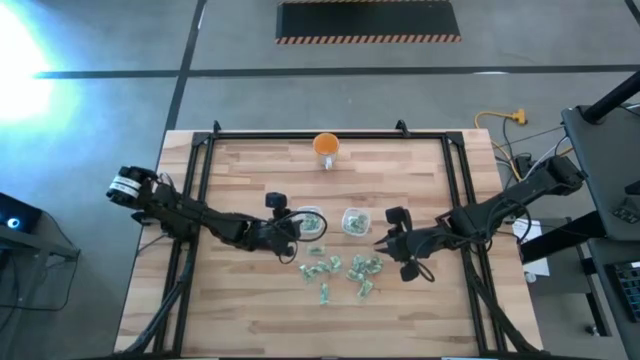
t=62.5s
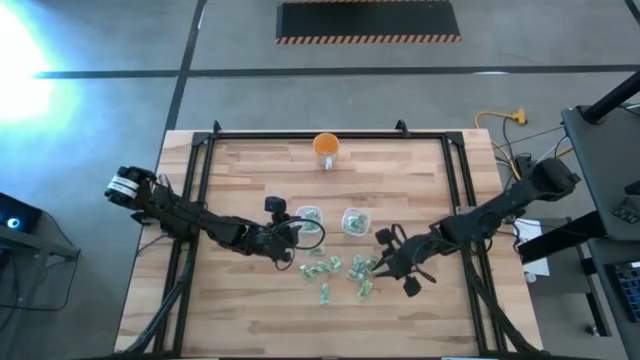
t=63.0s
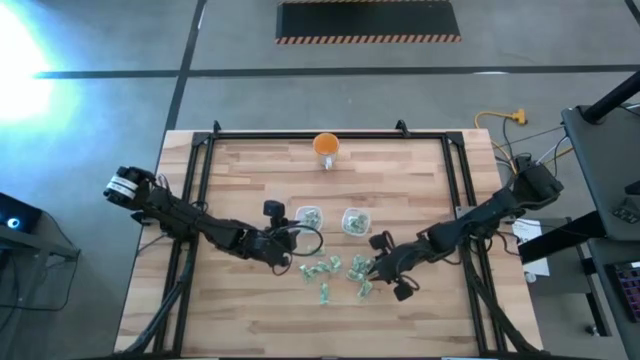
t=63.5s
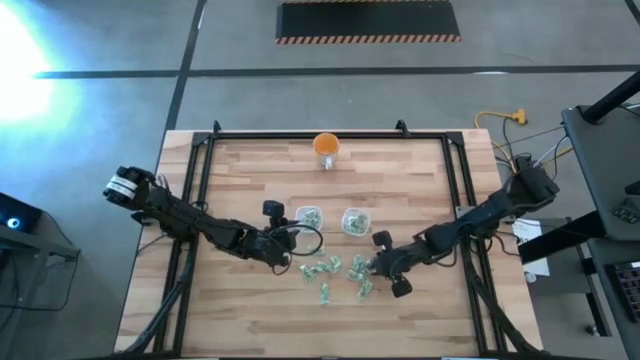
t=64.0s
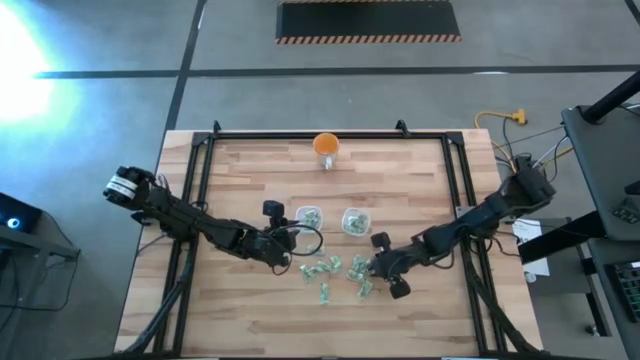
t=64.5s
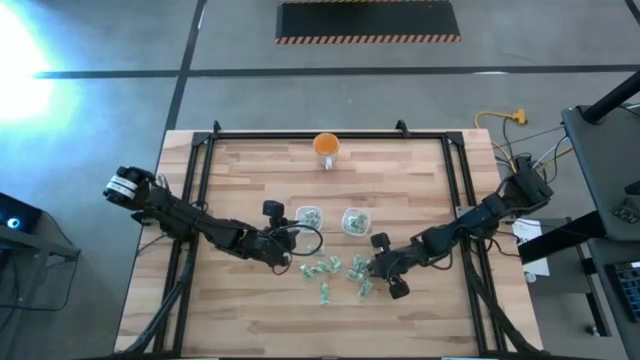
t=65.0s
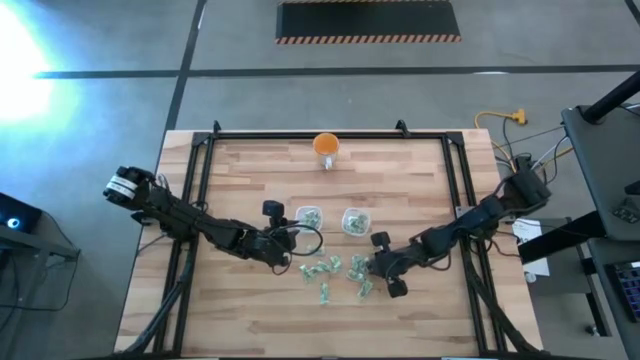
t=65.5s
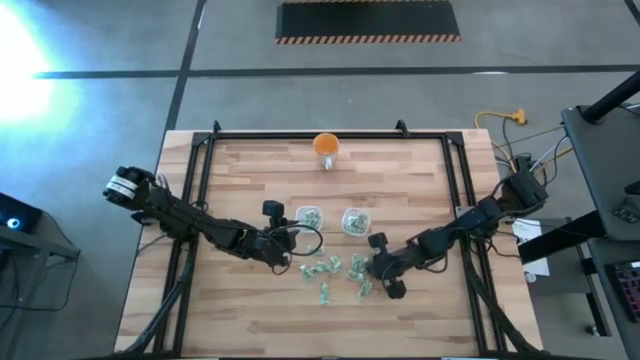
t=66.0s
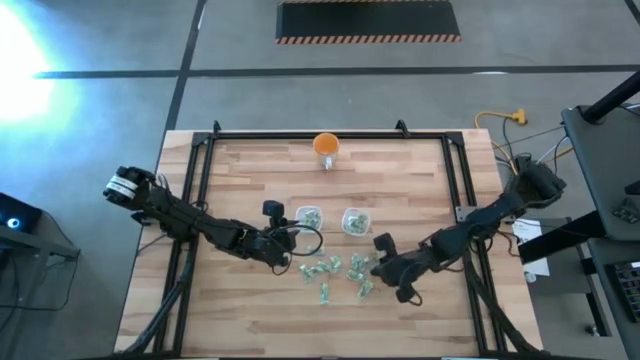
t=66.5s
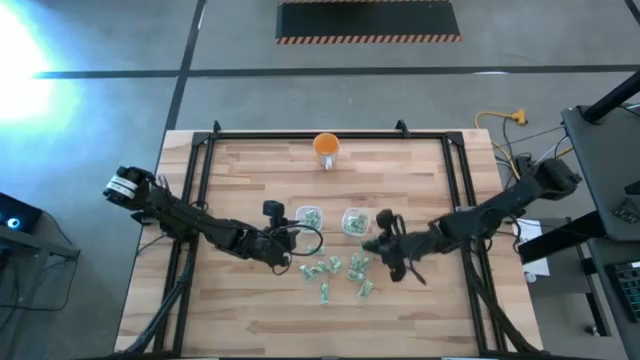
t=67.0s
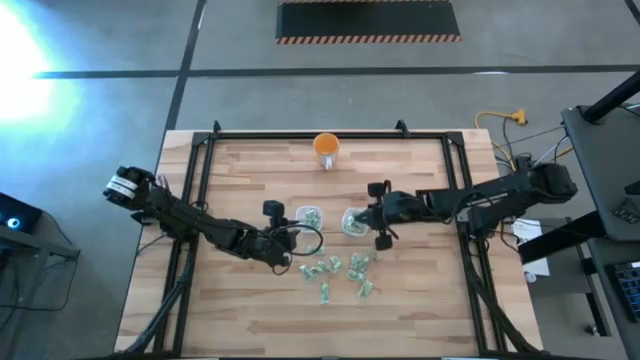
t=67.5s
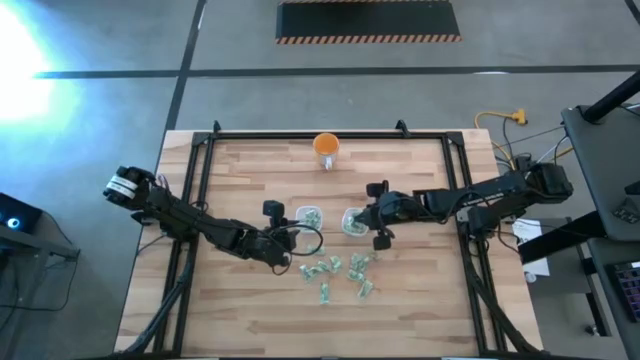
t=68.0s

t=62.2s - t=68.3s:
Task: Pick and place Stevia / Truvia into bins
Put the green stevia packet into the right transparent container

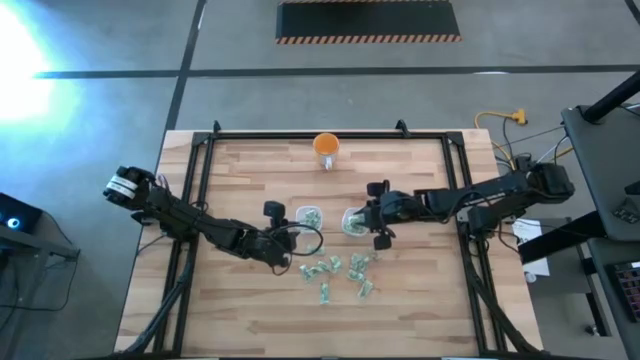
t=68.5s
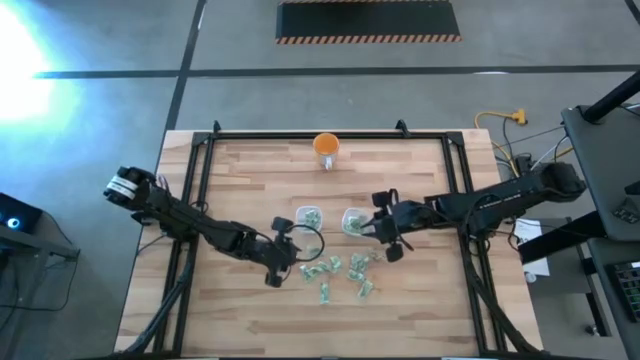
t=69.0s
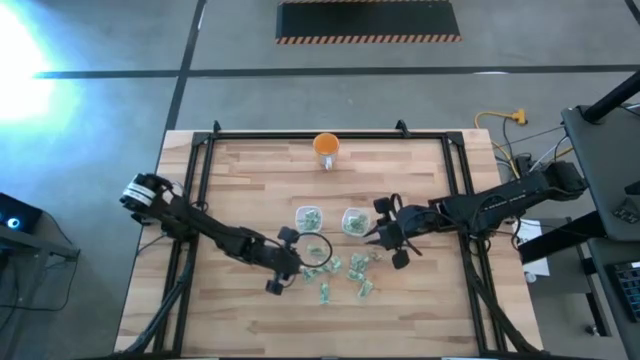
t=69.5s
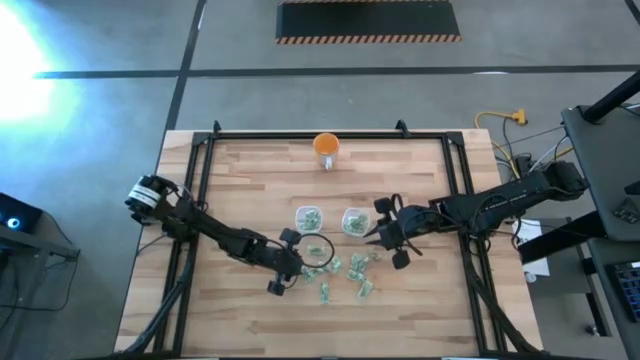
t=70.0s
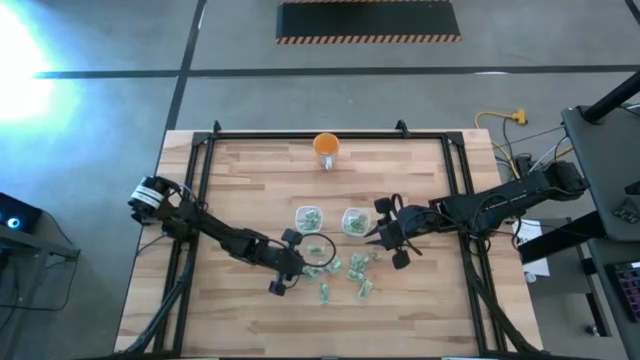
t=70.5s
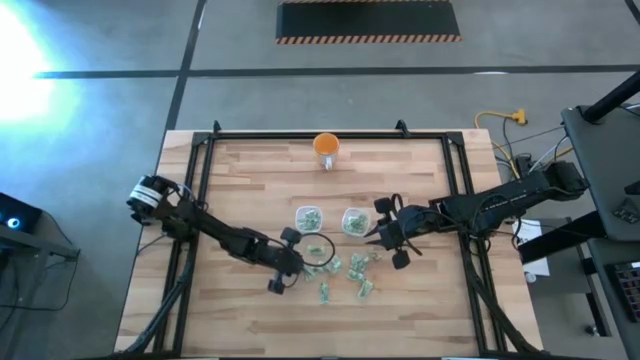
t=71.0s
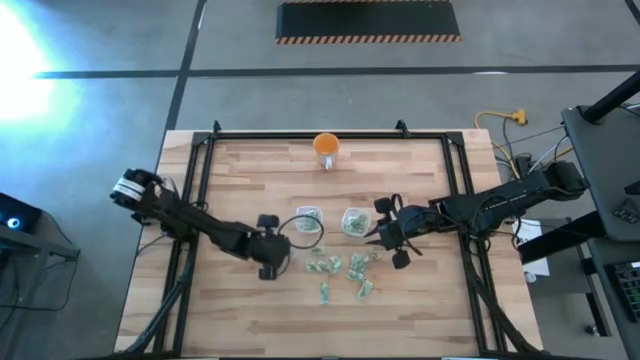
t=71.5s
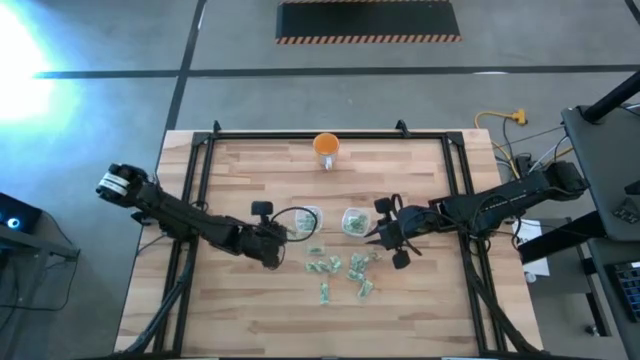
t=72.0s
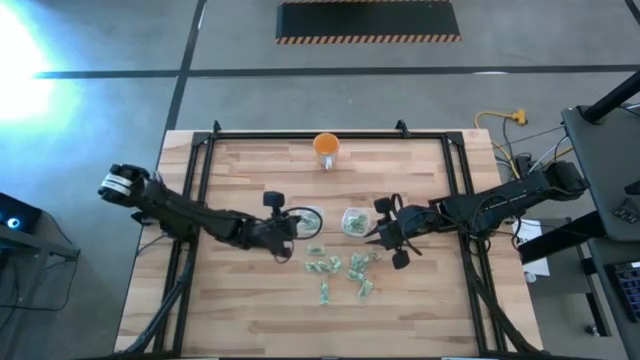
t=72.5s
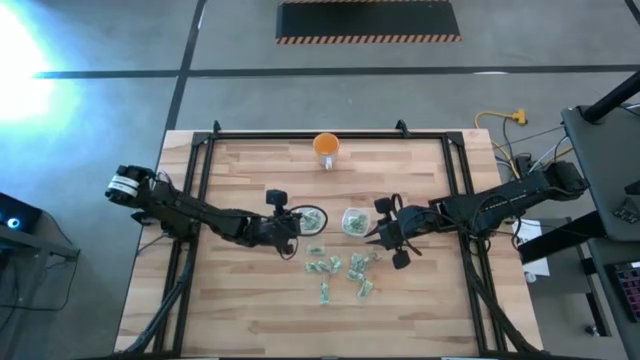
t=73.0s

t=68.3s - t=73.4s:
Put the green stevia packet into the left transparent container

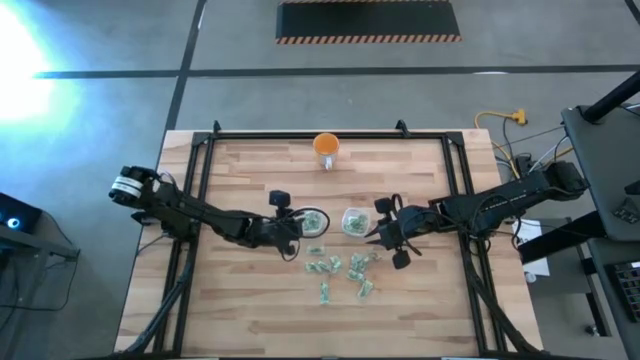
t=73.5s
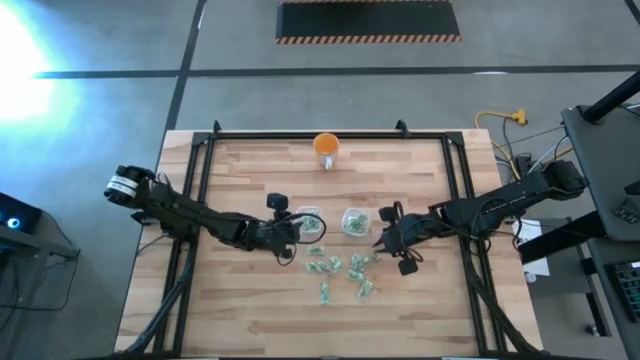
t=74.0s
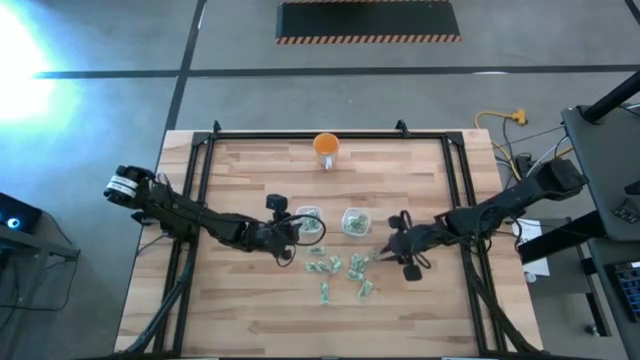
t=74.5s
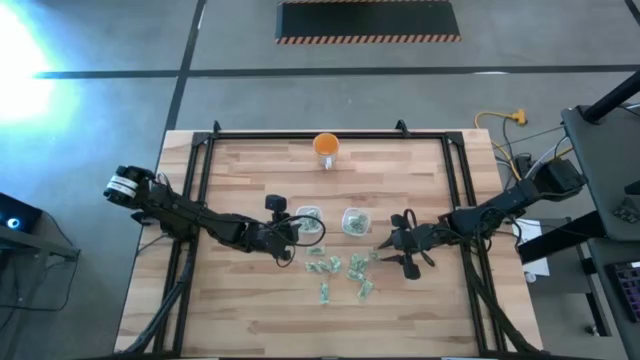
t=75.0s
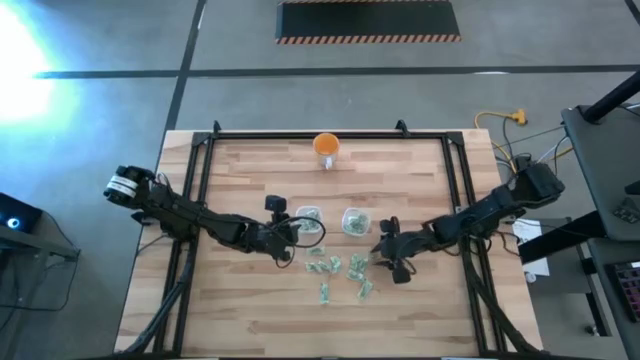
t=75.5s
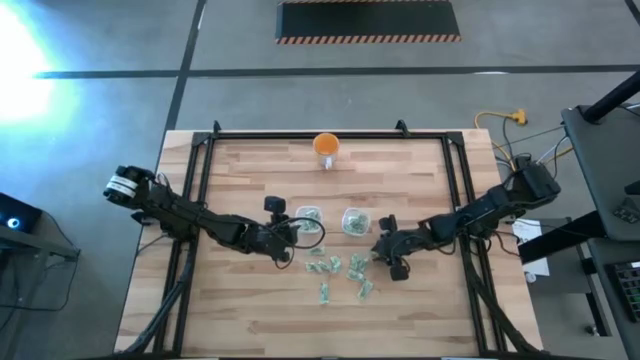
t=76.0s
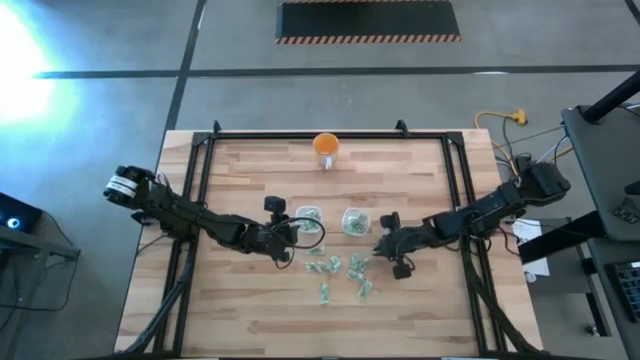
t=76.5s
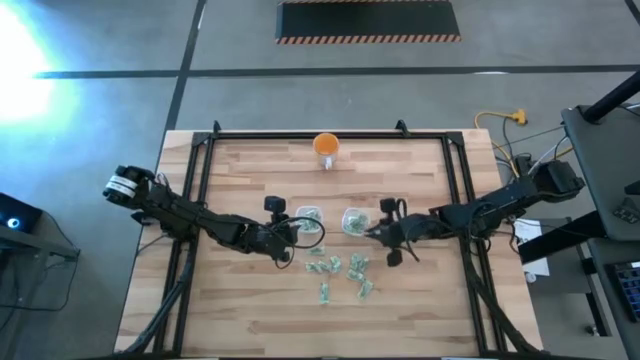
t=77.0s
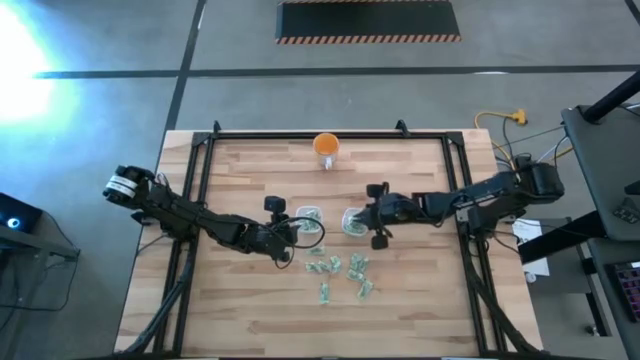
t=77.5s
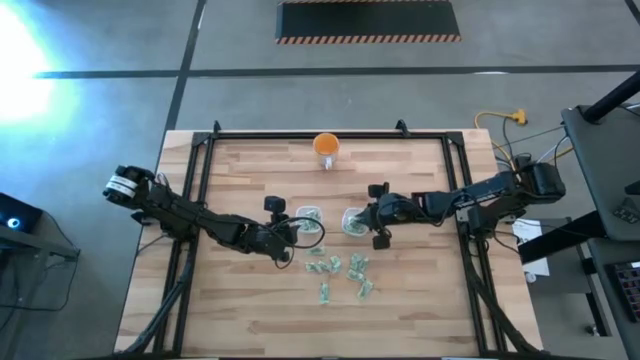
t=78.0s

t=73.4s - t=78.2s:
Put the green stevia packet into the right transparent container

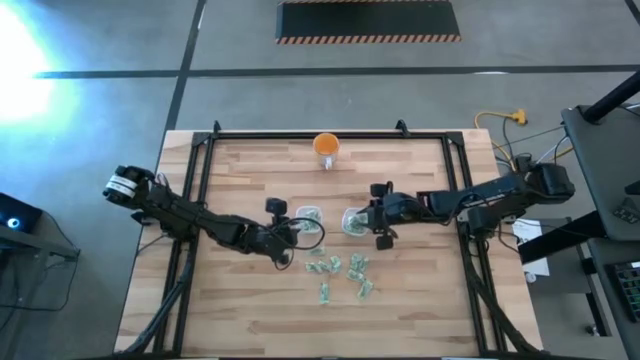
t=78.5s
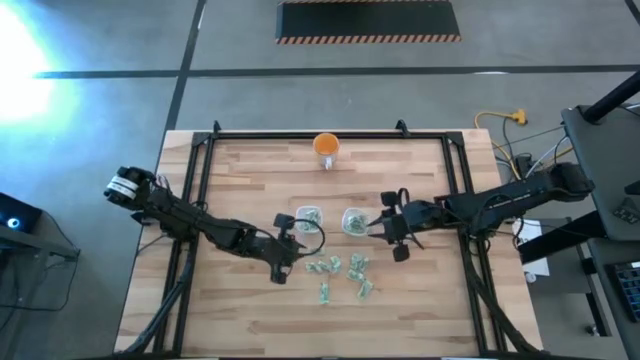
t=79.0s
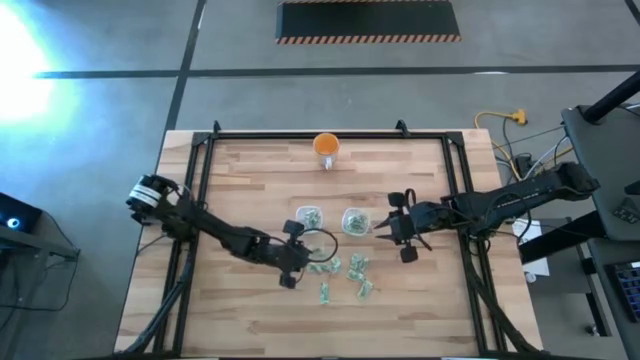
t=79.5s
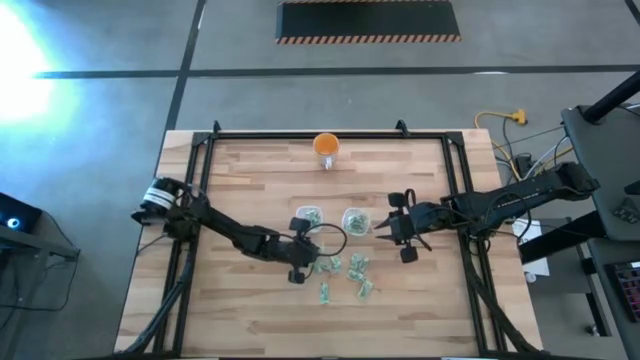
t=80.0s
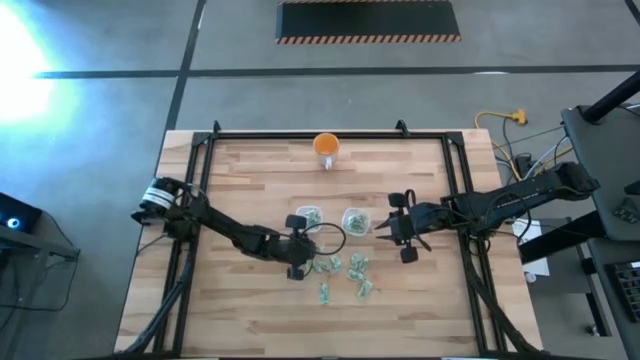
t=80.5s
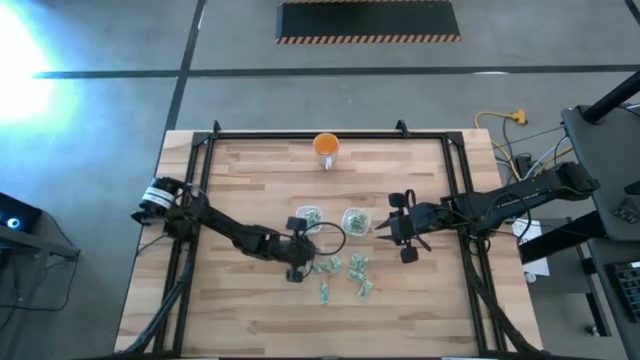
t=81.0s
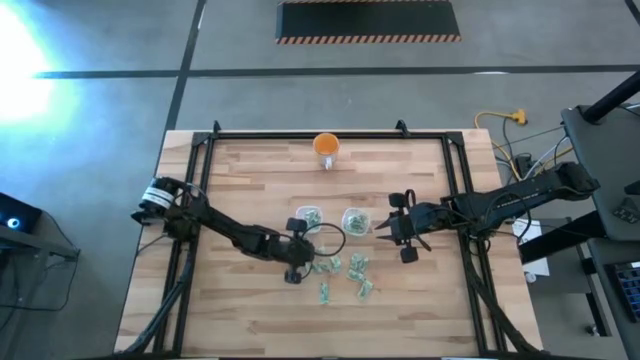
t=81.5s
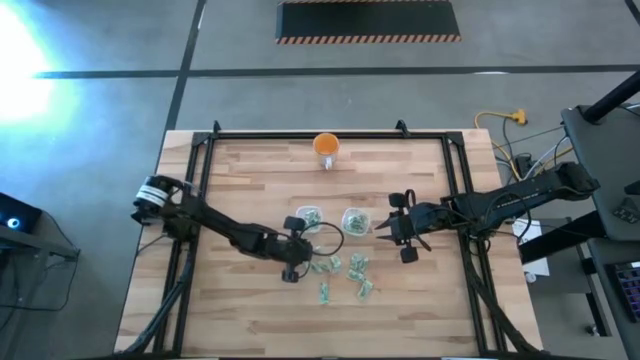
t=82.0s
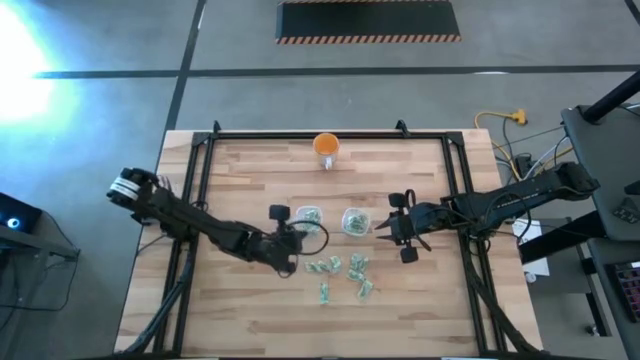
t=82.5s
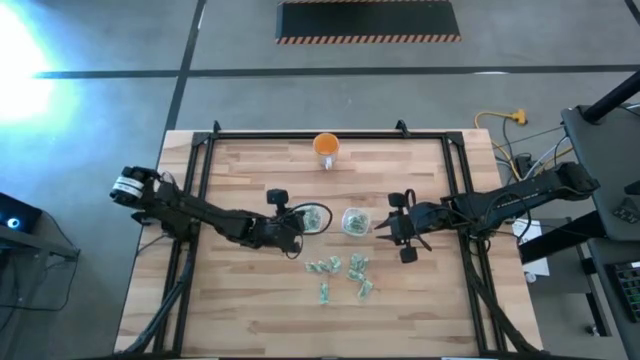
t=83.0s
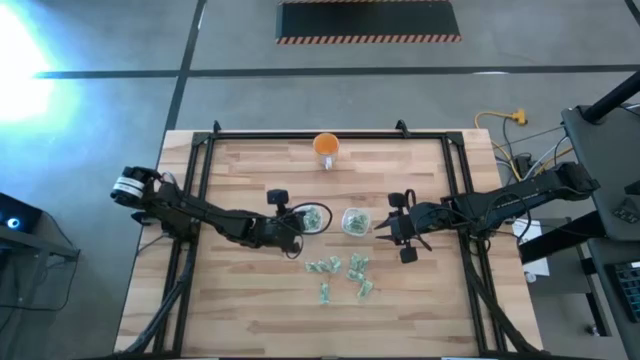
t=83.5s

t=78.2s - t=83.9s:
Put the green stevia packet into the left transparent container
